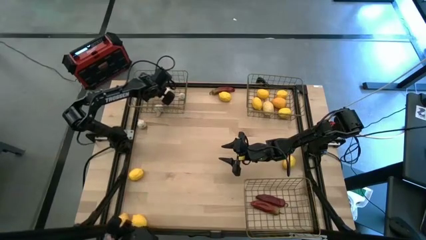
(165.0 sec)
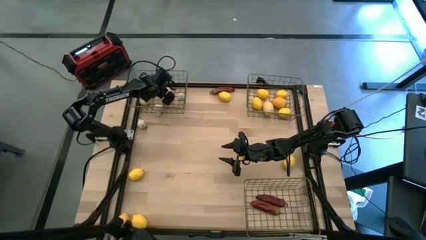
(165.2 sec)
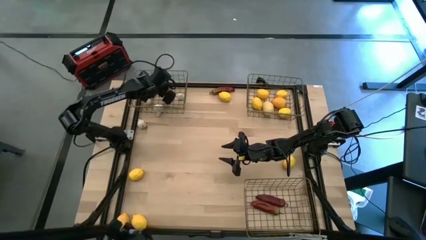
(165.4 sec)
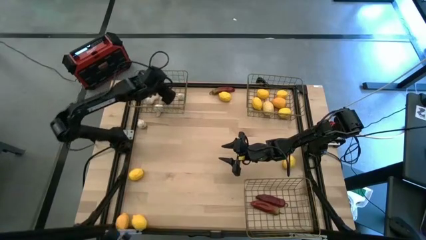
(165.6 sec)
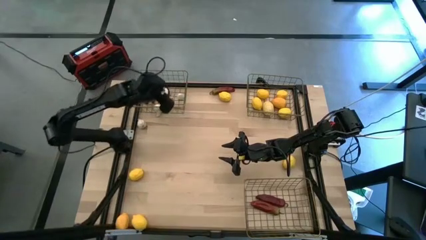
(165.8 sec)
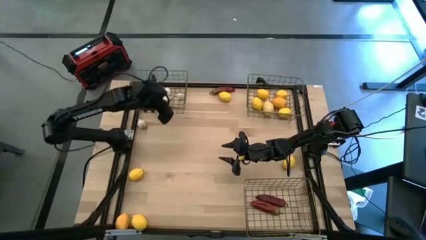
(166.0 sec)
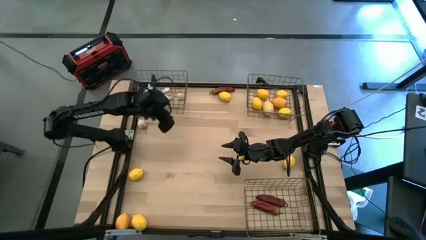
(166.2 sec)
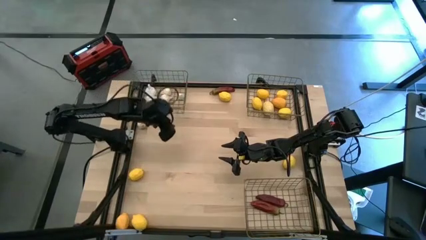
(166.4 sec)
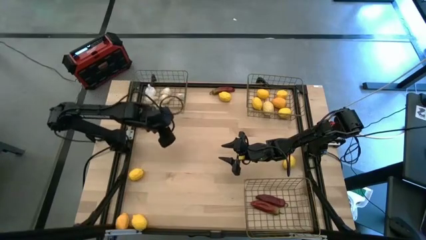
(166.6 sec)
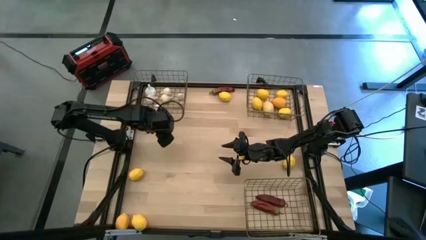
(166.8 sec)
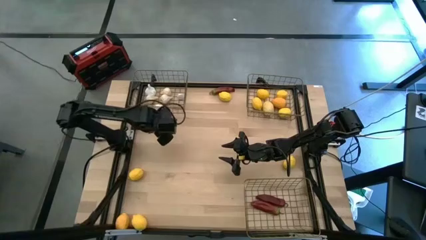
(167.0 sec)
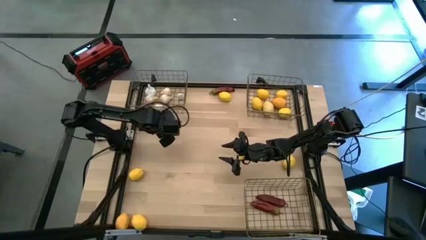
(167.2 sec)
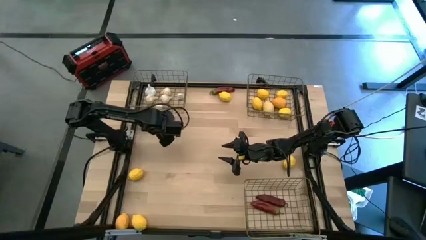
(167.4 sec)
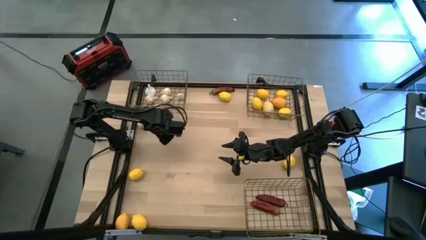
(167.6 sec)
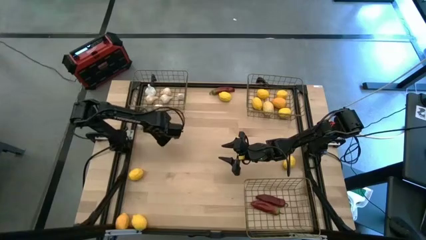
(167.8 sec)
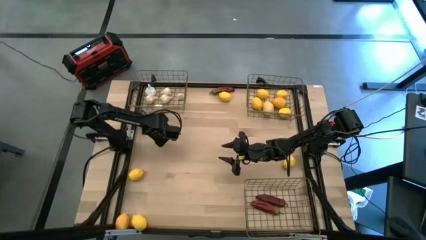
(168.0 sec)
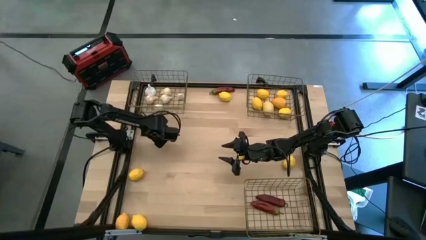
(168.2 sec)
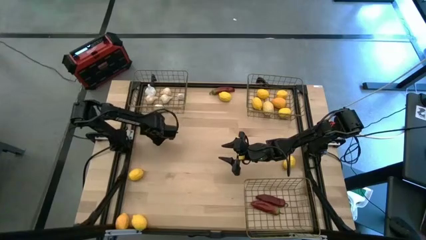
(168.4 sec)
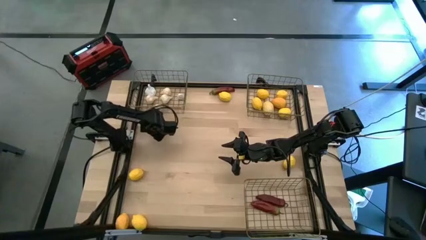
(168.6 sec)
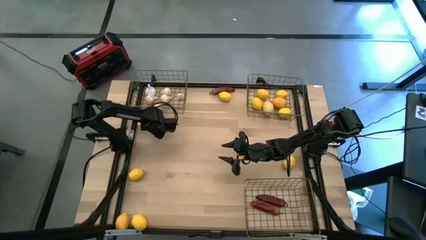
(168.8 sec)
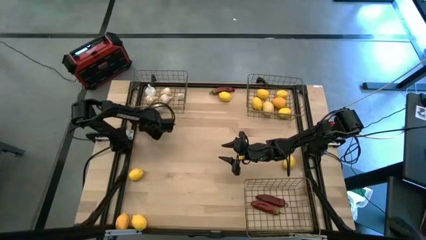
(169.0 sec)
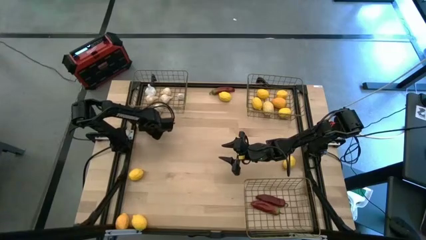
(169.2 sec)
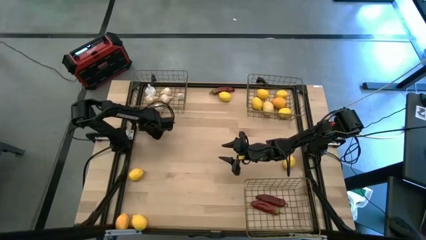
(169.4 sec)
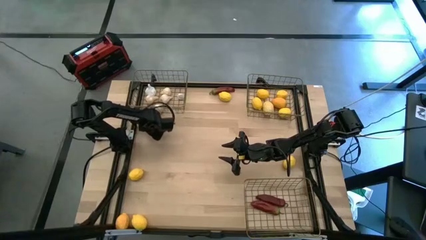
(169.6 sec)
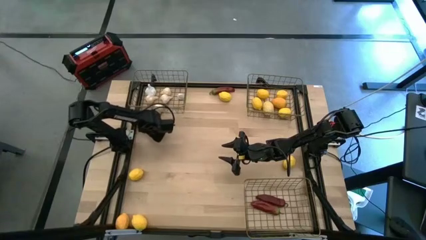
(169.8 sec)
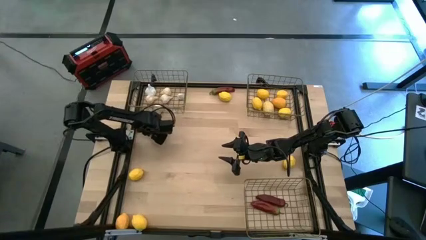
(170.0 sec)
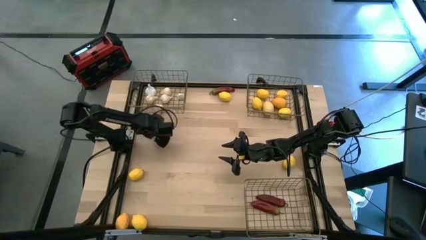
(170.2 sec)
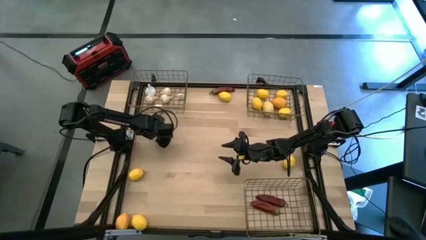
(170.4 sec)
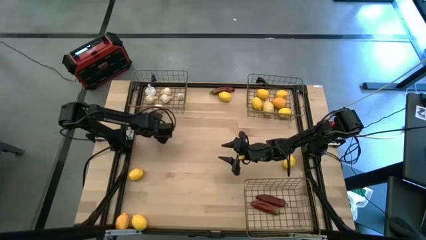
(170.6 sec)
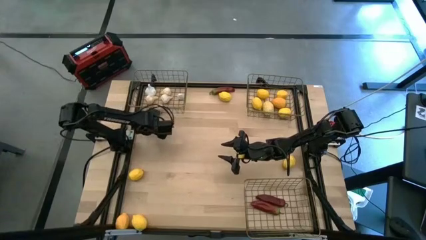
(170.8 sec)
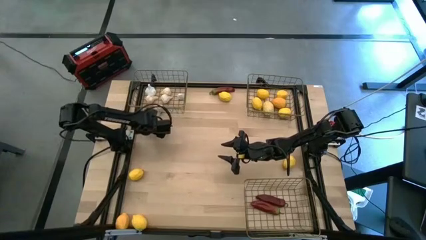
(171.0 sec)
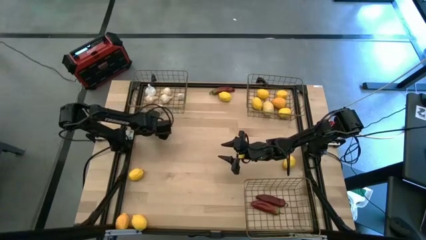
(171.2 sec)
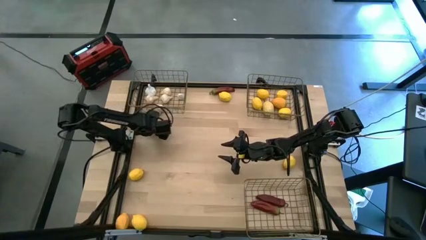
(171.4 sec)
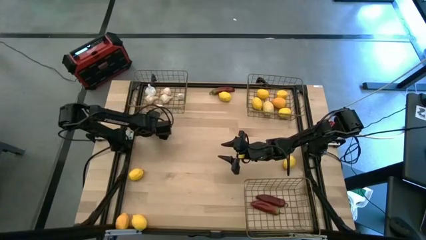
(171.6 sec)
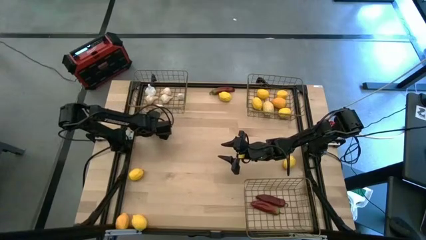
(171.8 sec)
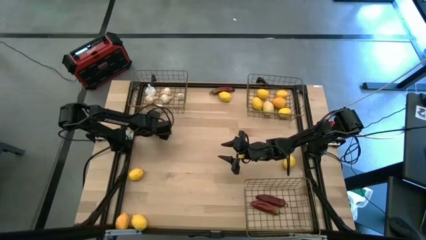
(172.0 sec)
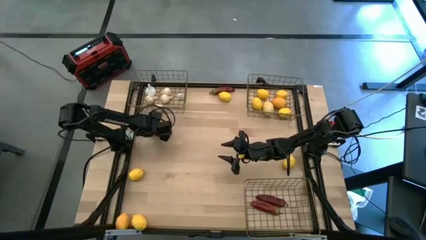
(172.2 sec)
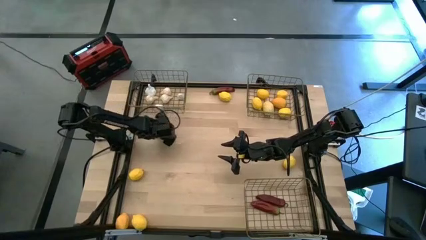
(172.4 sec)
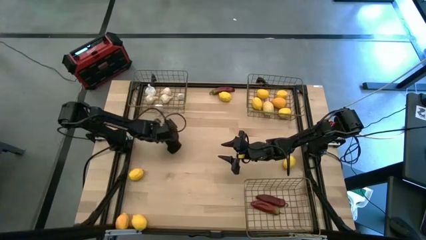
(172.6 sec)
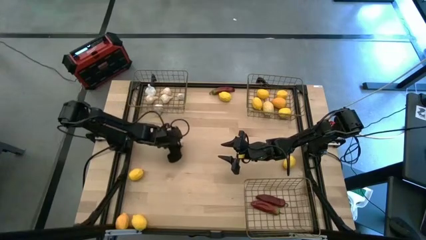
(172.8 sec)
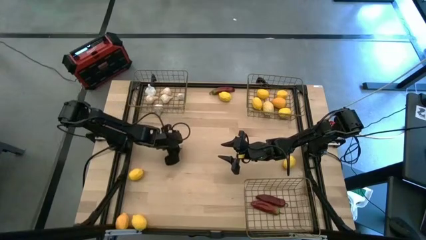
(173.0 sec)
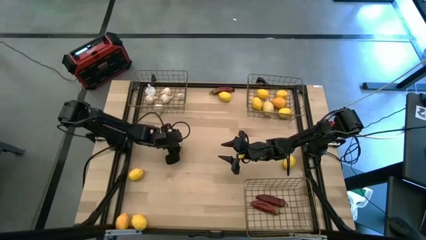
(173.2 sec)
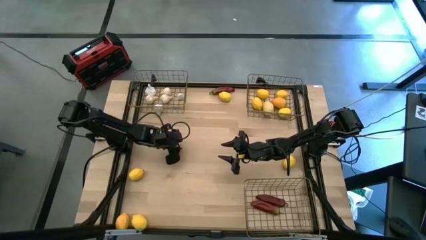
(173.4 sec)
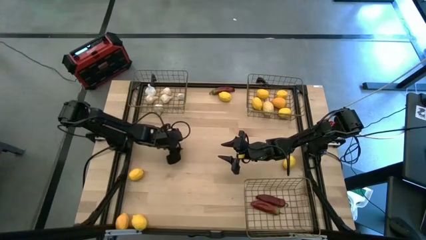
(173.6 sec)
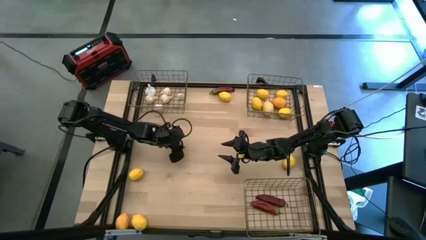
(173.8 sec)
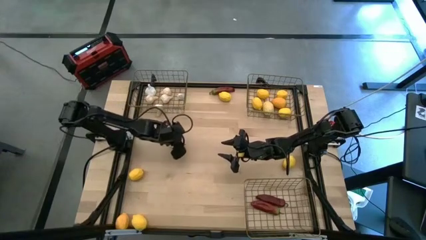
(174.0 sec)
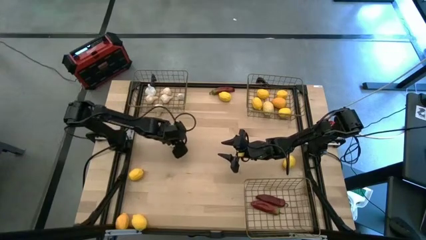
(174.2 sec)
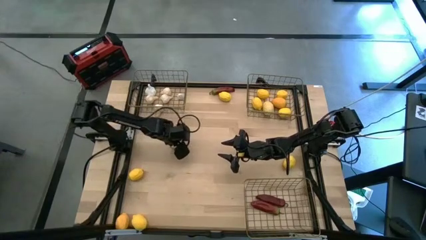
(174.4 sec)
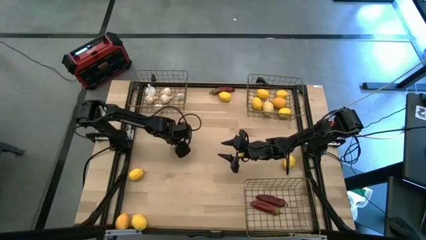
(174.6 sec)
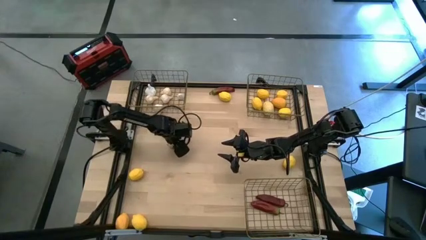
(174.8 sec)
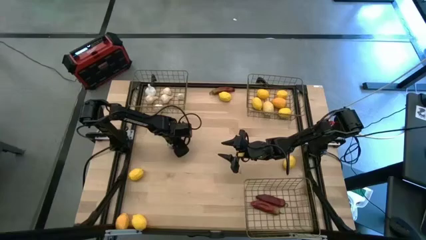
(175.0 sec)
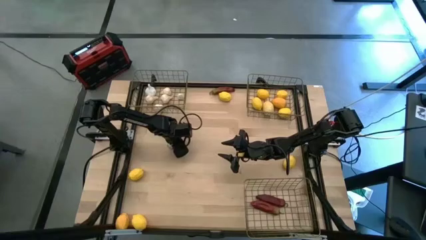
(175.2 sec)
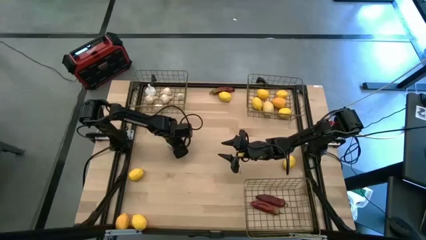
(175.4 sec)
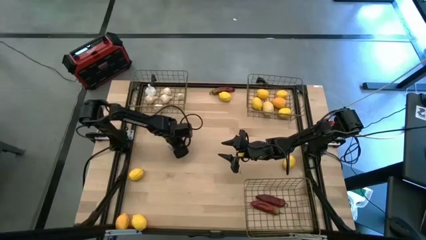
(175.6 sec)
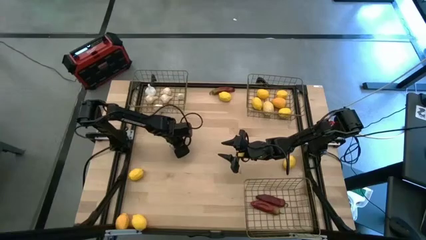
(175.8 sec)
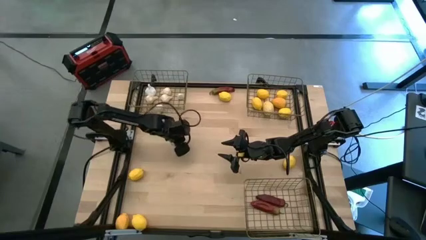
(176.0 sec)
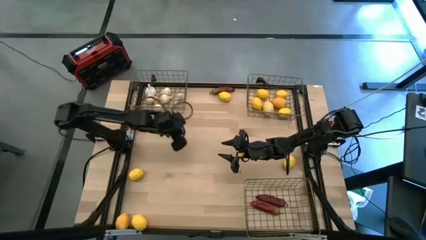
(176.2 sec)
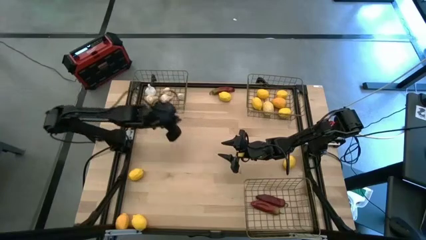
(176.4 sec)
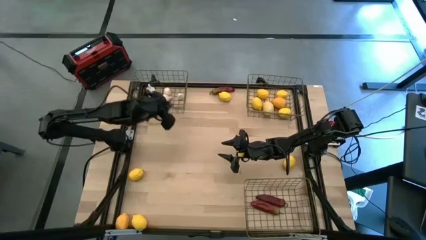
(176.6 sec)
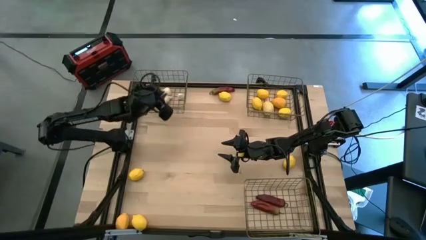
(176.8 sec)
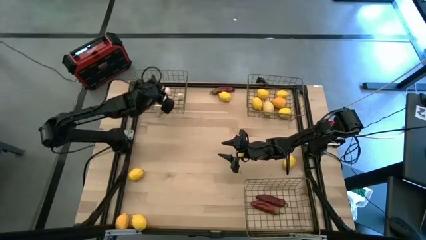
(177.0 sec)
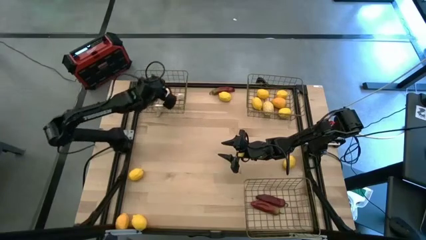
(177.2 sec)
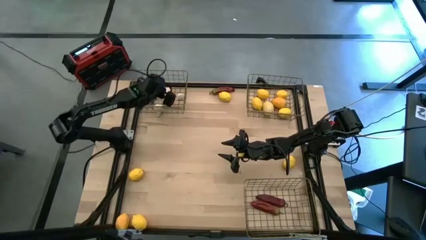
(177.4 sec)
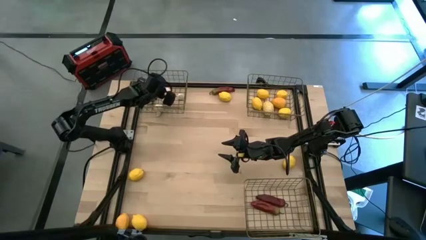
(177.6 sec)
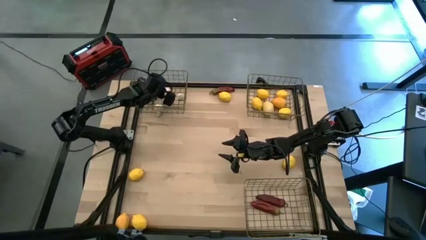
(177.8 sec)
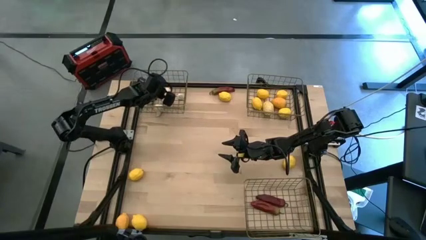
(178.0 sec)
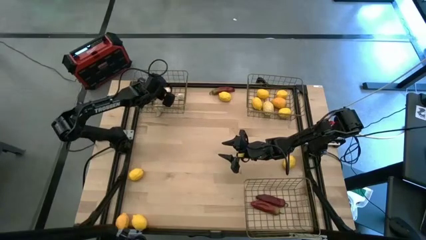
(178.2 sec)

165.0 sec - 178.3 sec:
Task: Sort produce into baskets
Put the white garlic into the top left wire basket
